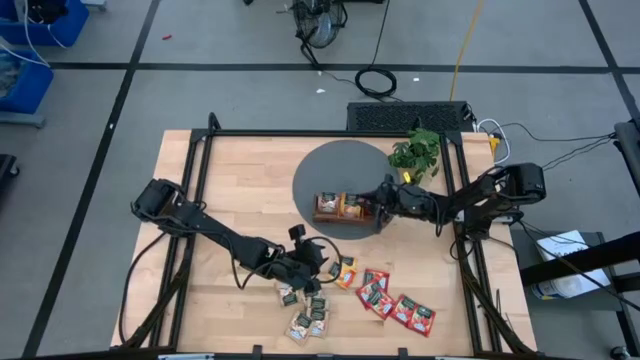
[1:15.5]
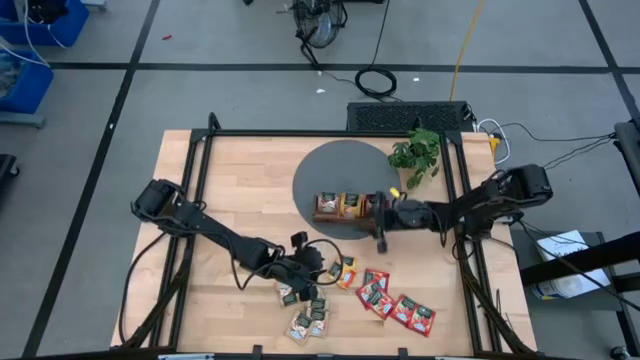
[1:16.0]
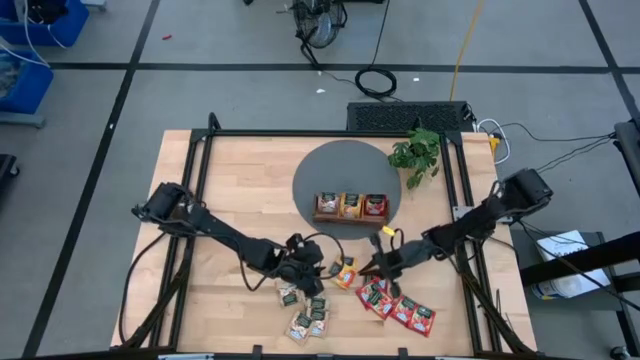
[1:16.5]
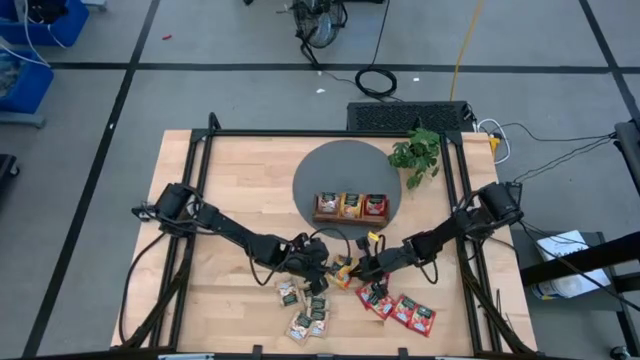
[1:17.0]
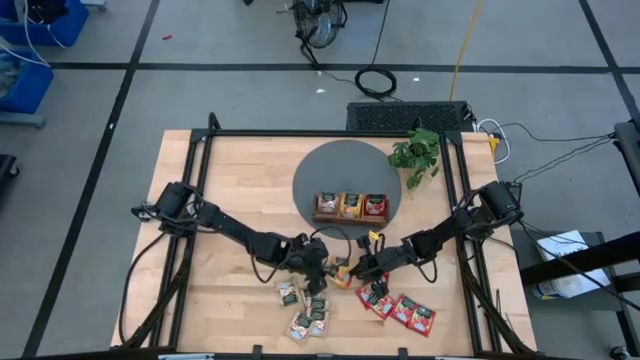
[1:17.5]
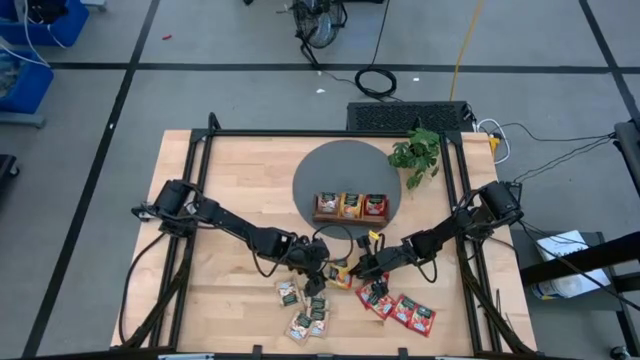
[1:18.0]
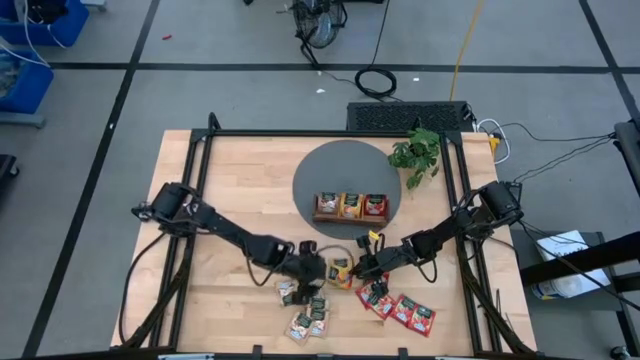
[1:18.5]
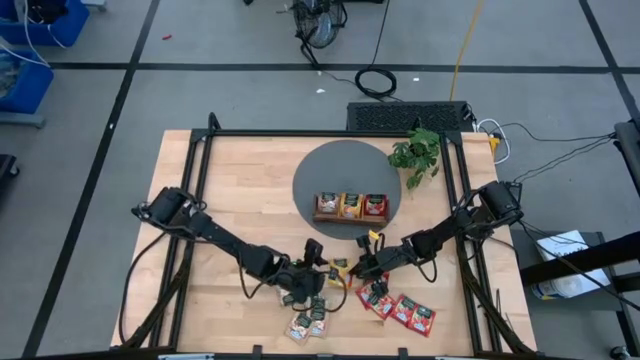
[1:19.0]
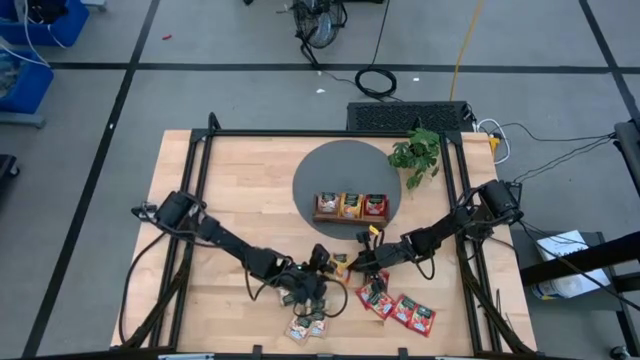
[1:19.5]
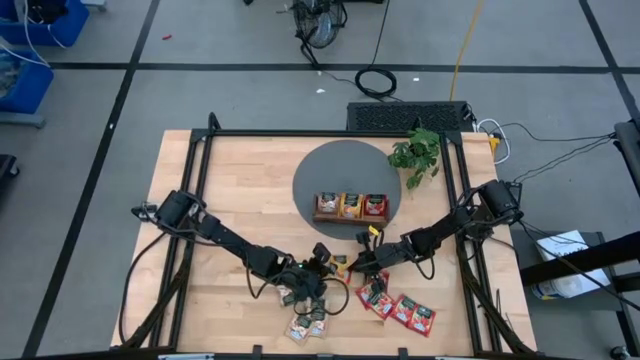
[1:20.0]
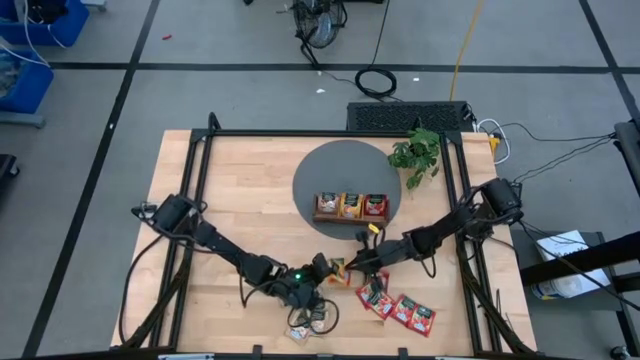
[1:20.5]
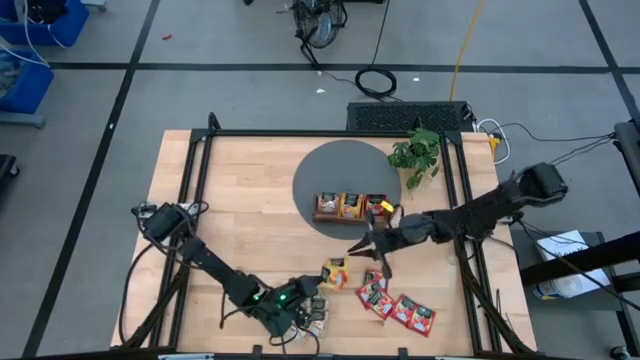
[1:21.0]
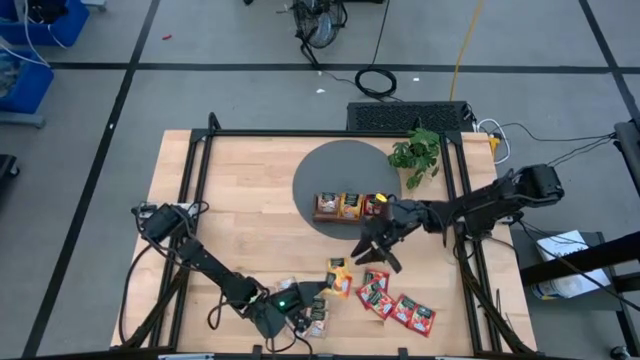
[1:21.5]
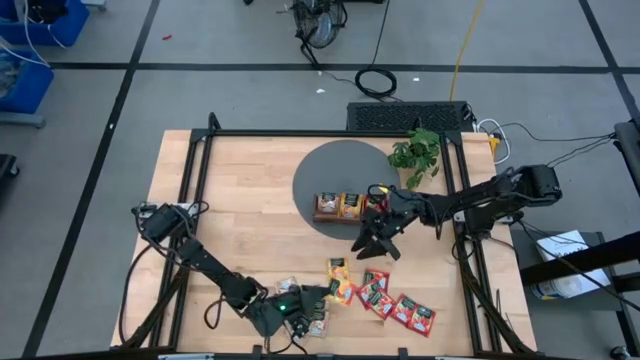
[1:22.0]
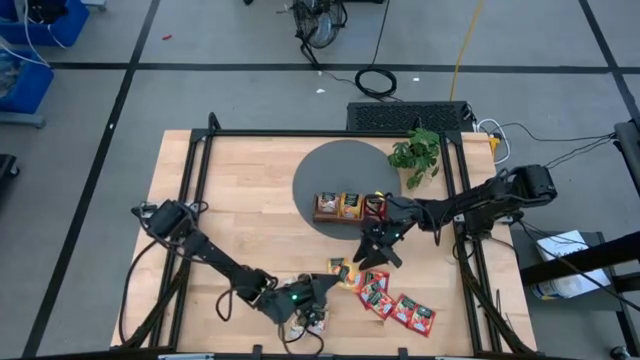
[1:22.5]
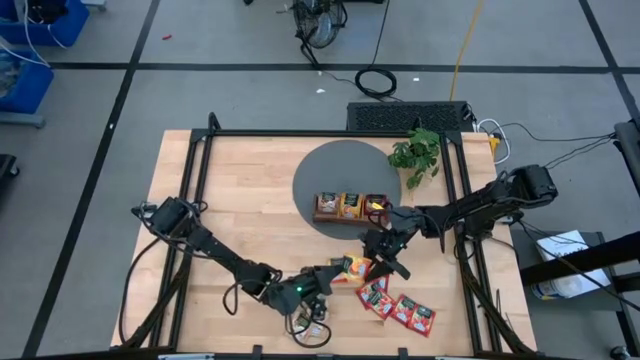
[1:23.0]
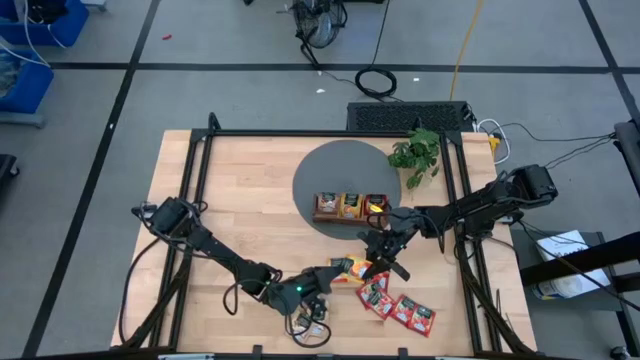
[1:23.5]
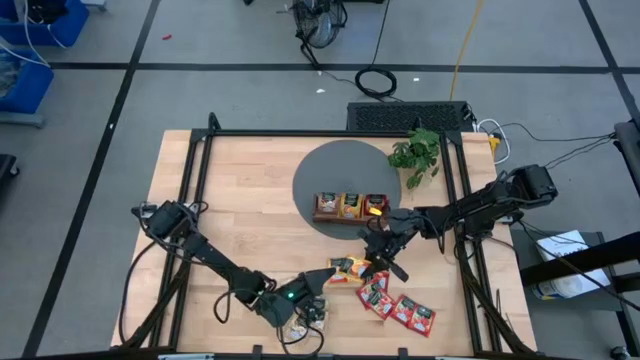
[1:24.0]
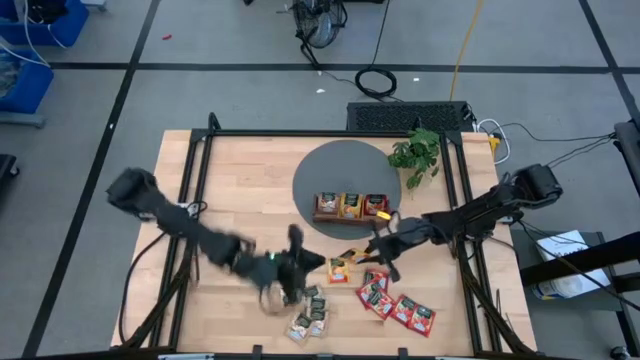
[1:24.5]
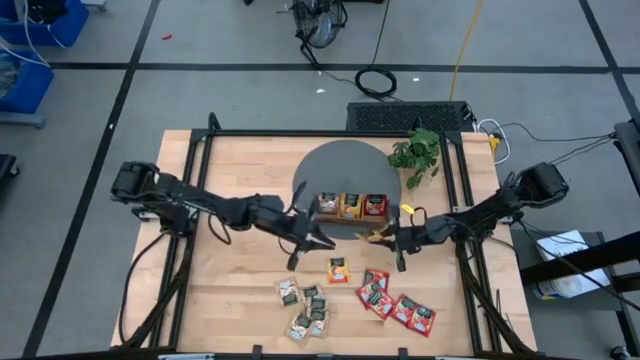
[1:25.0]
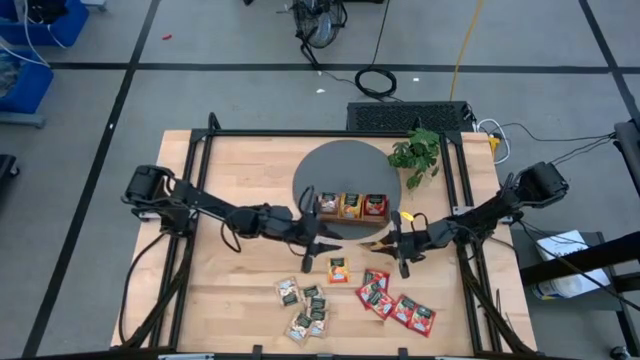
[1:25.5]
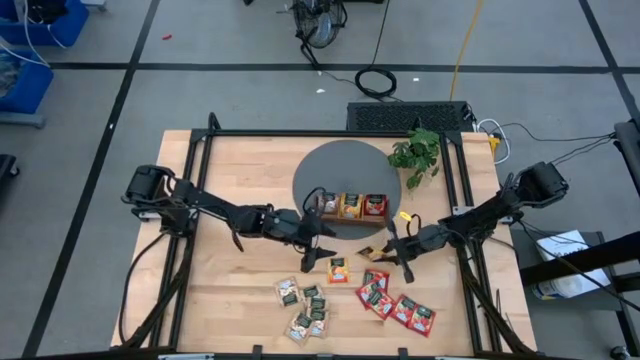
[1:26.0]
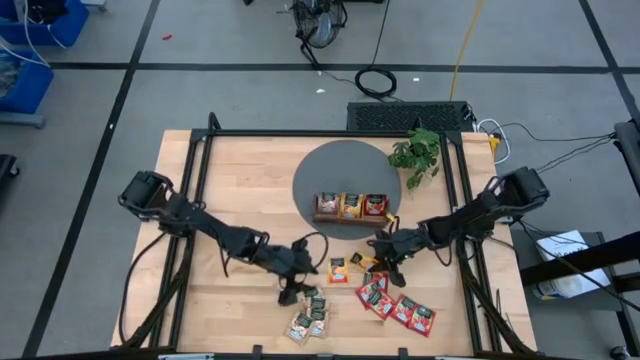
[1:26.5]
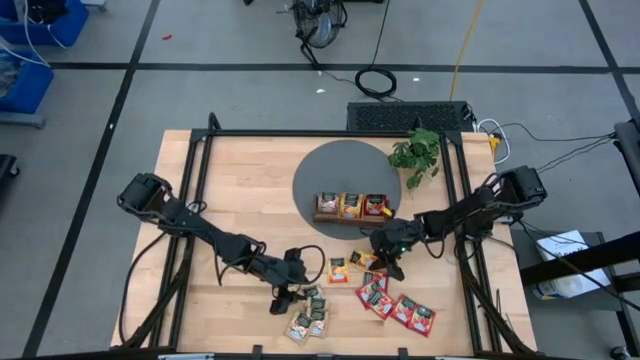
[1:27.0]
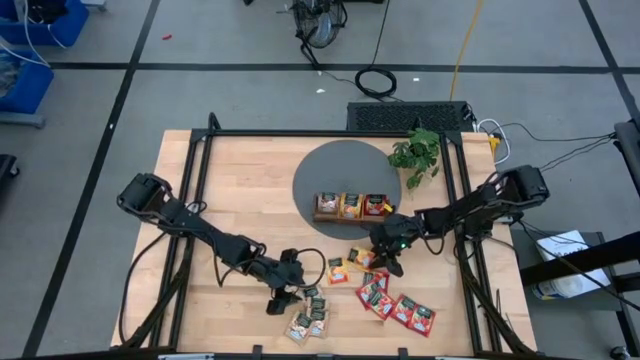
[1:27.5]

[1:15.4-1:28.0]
Task: Pick & Place Tea
Put the brown tea bag into the left section of the wooden organiser

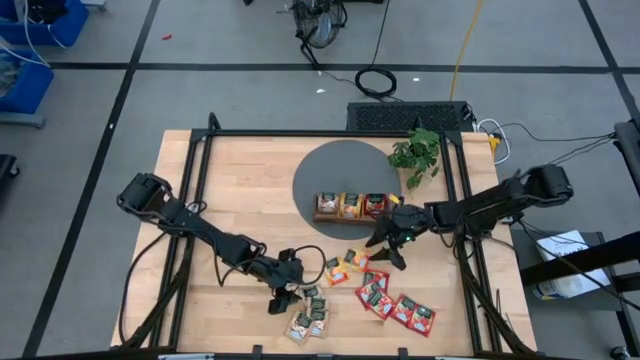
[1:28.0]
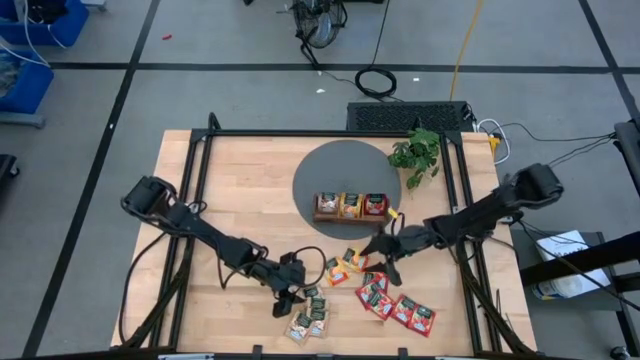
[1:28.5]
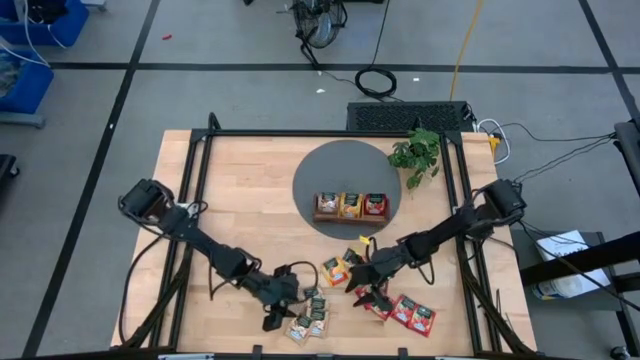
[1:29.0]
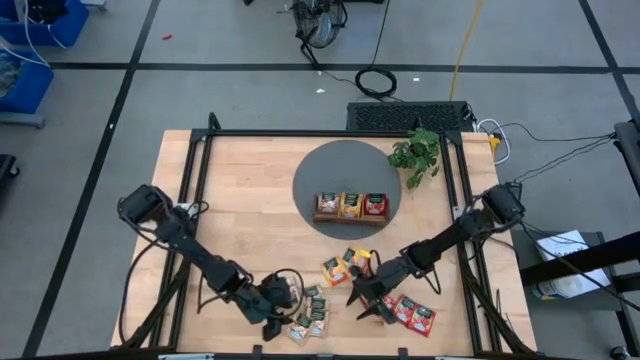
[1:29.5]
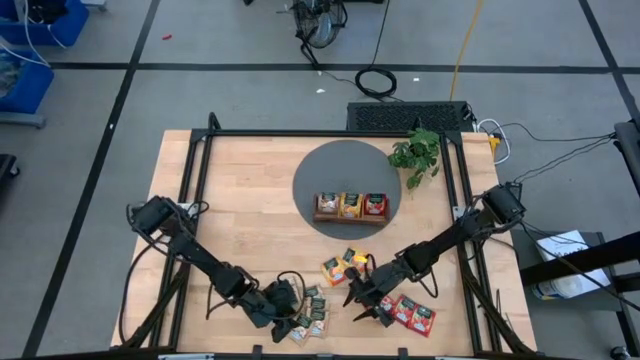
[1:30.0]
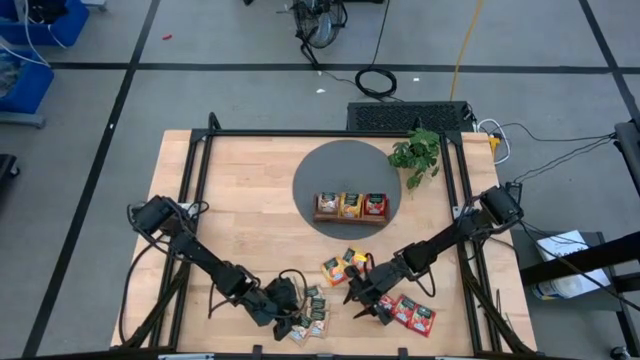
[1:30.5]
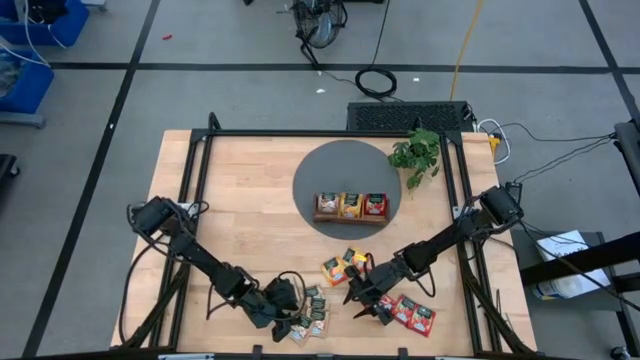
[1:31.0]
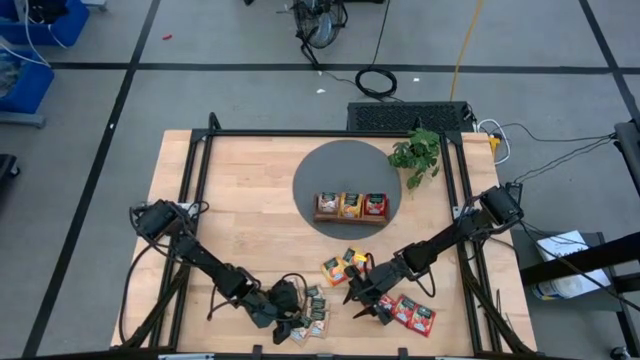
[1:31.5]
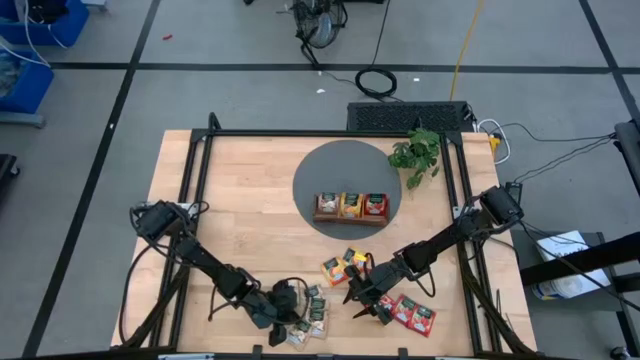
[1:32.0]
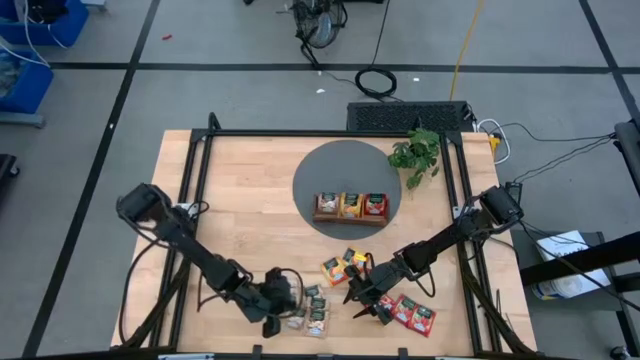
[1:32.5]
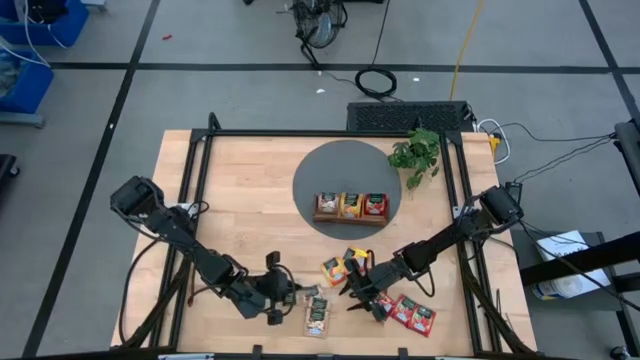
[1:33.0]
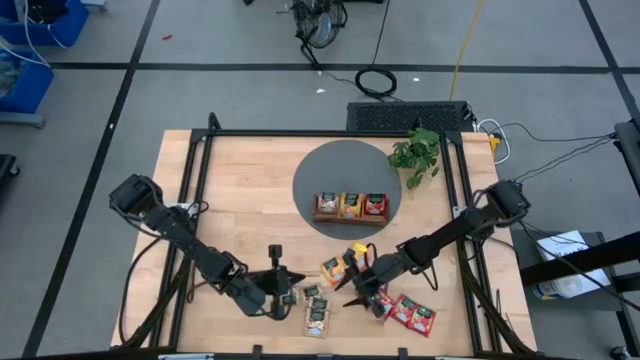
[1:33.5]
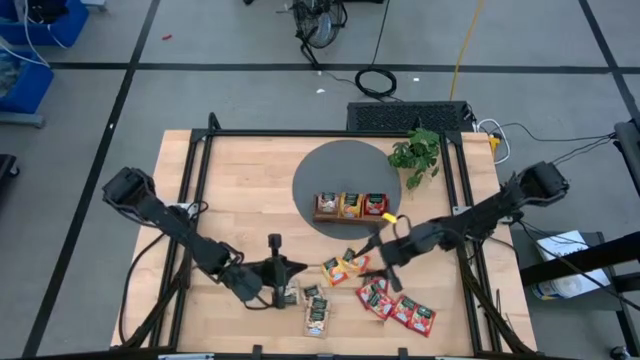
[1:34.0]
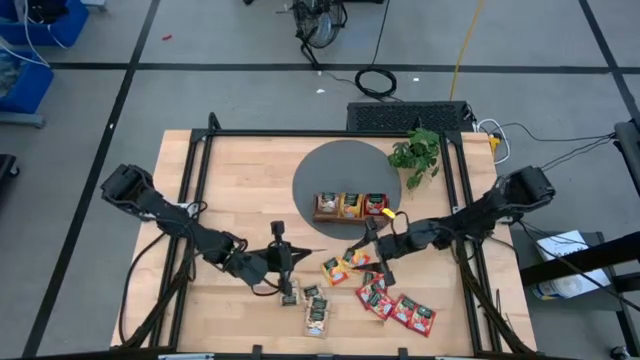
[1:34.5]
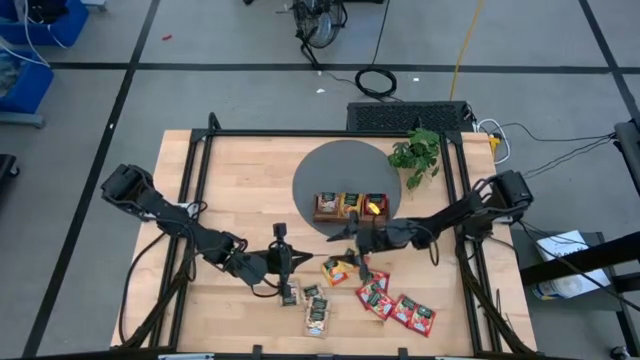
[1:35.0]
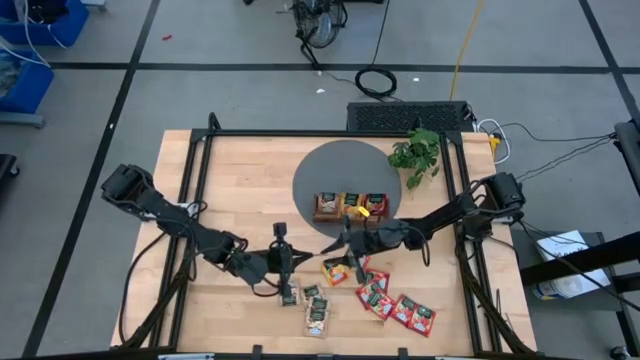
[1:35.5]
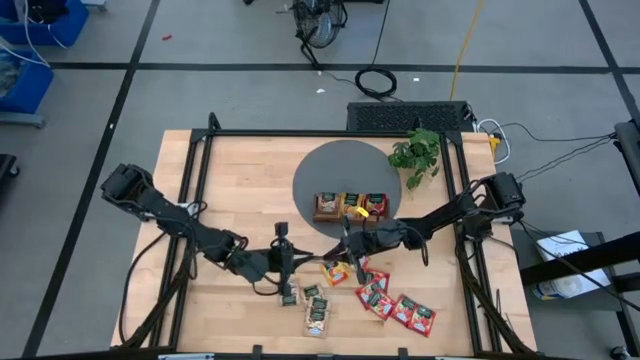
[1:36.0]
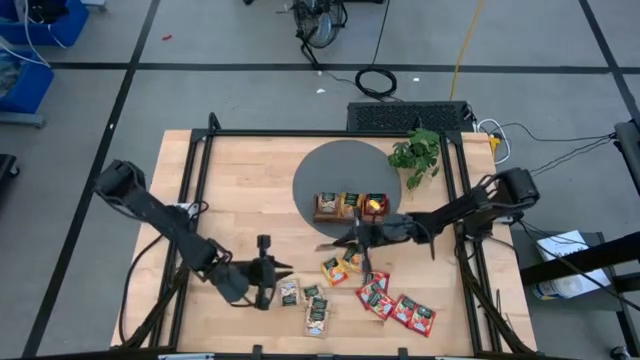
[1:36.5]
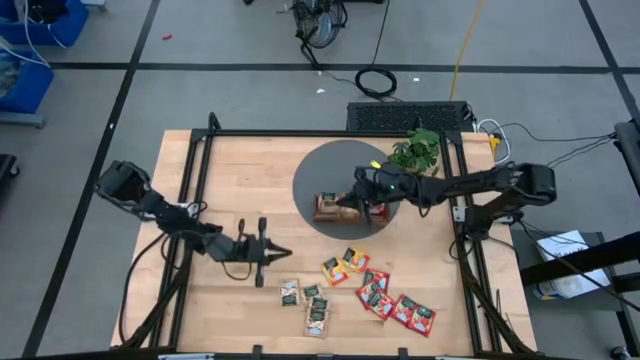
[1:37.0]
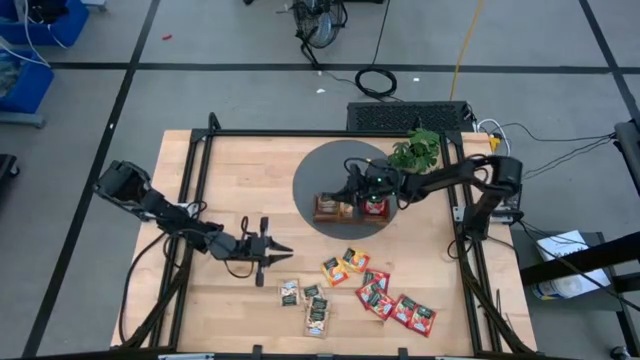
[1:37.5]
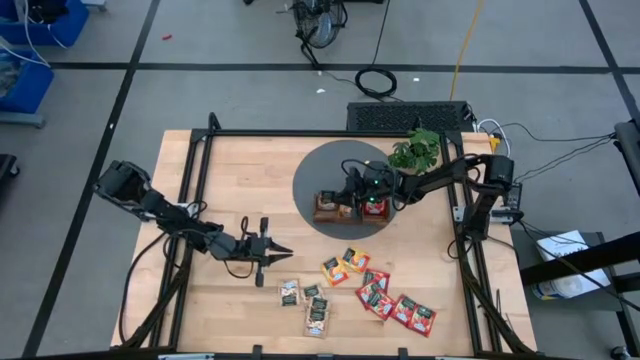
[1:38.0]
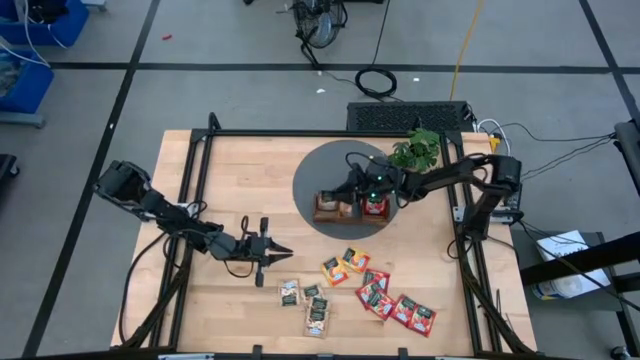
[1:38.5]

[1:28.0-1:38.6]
Put the brown tea bag into the left section of the wooden organiser
